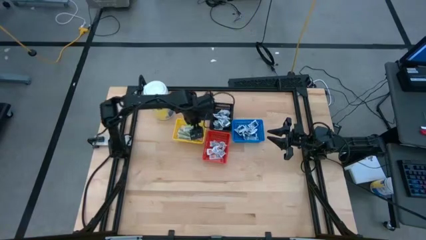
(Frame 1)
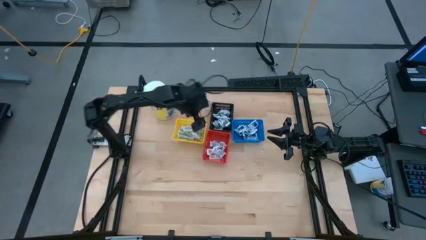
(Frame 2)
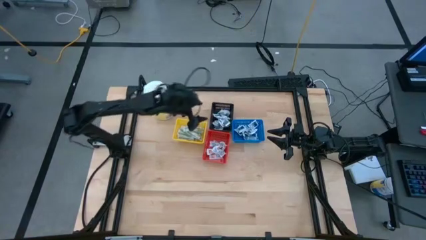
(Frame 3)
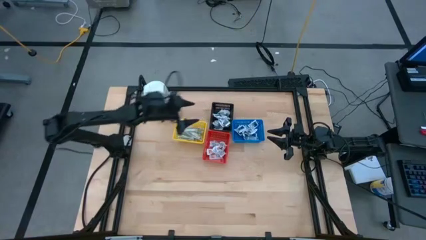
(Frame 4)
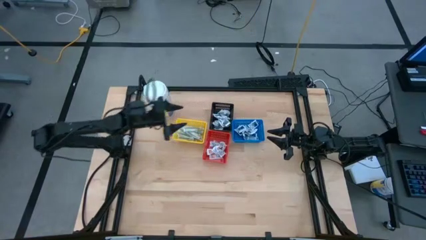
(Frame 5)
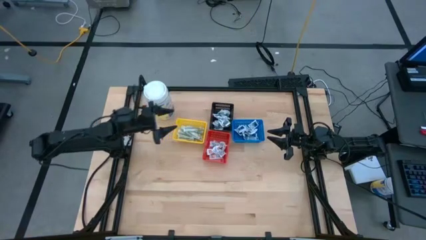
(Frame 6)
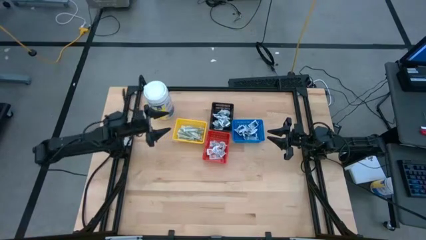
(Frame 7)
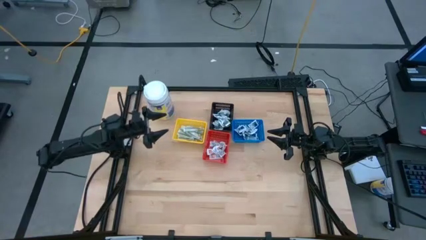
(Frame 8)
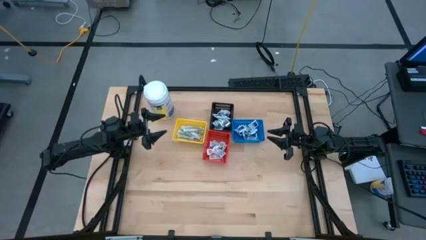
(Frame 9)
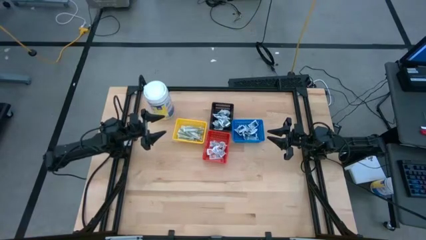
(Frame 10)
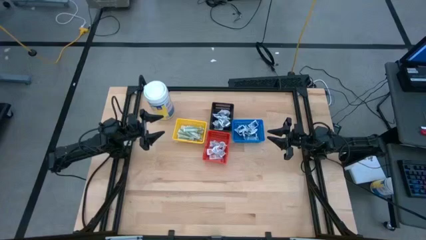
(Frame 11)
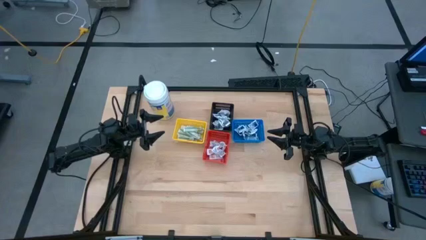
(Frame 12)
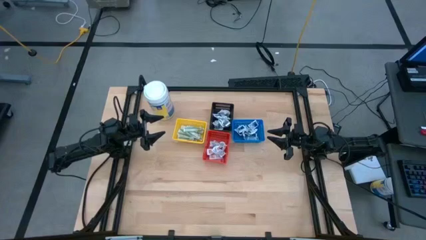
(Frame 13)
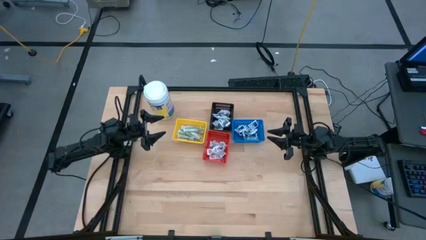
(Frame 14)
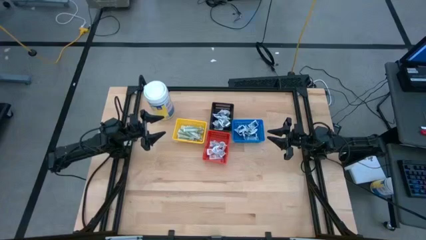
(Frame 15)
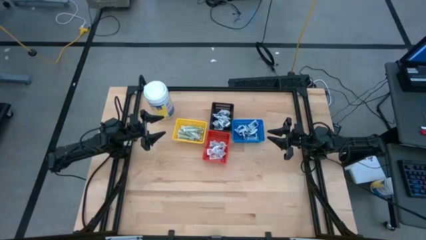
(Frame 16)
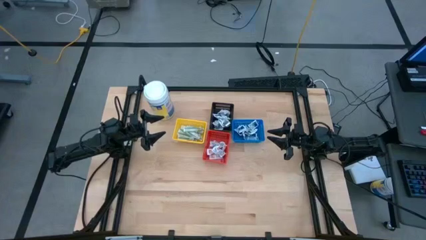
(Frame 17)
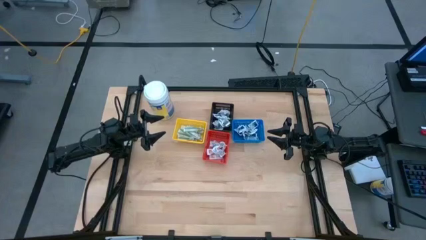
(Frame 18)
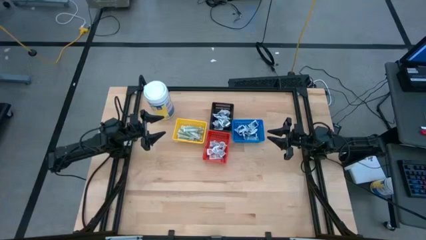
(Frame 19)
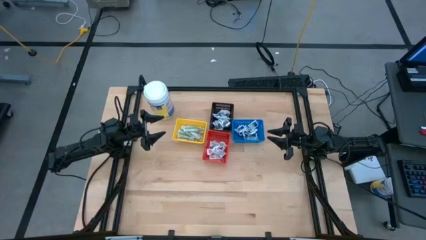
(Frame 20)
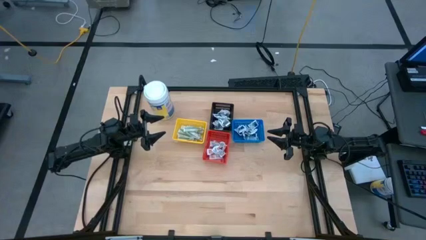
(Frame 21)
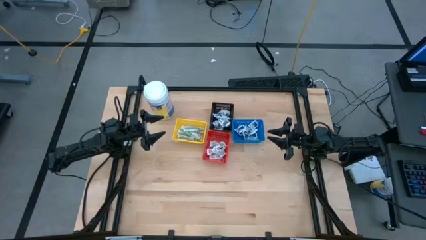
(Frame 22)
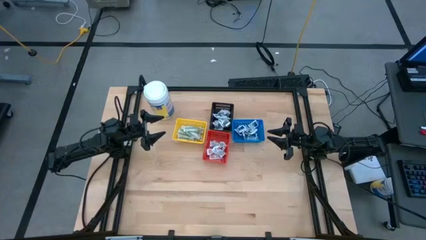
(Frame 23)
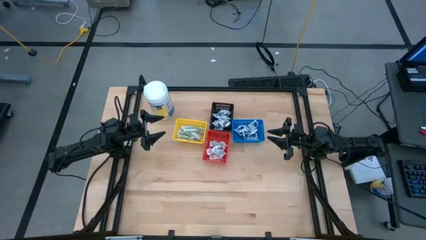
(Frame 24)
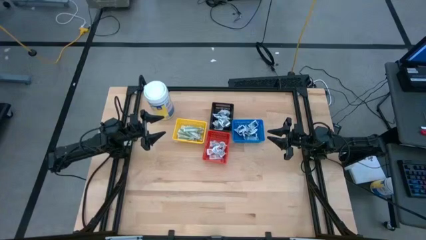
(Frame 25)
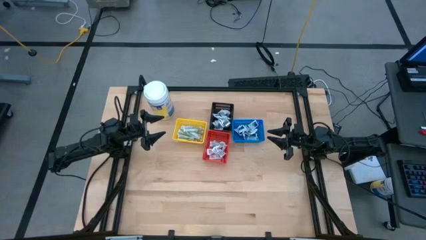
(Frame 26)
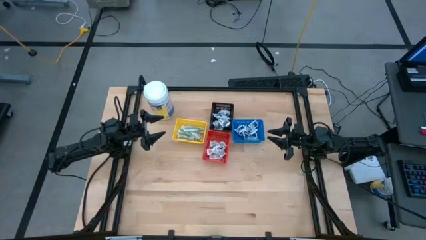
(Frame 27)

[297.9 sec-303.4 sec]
Task: Pick & Place First Aid Supplies
Return to Home Position

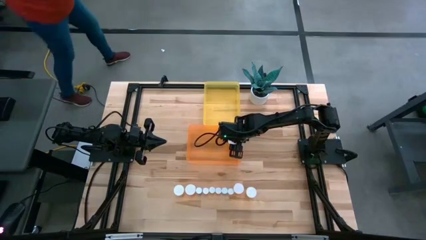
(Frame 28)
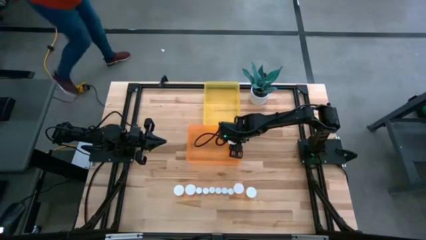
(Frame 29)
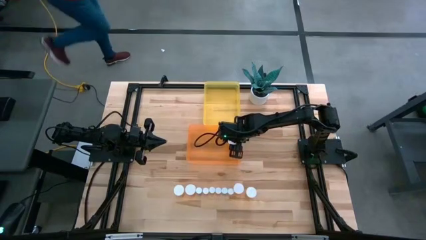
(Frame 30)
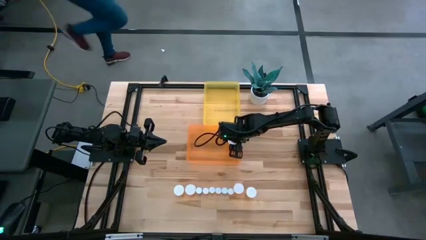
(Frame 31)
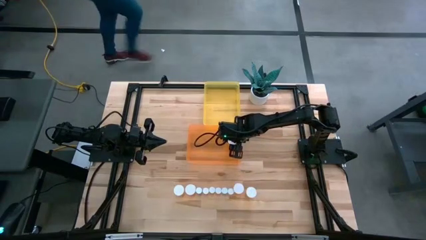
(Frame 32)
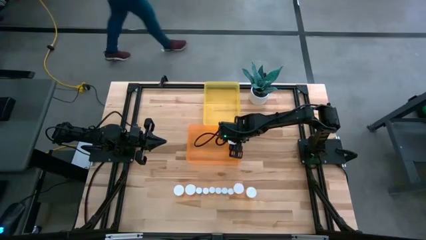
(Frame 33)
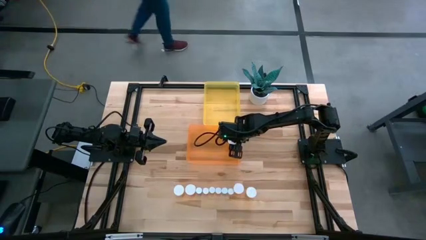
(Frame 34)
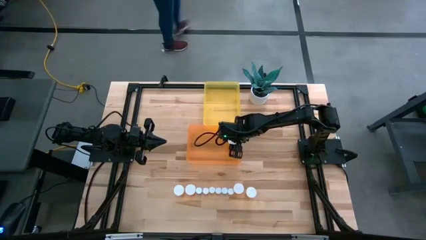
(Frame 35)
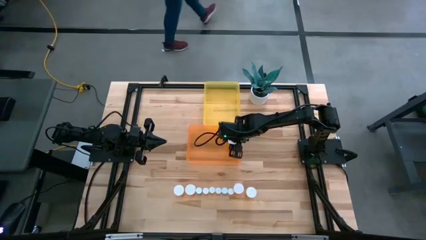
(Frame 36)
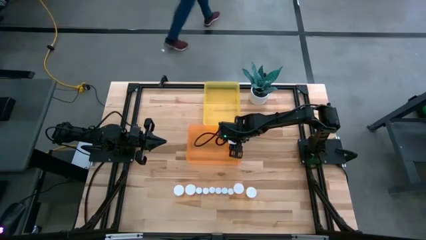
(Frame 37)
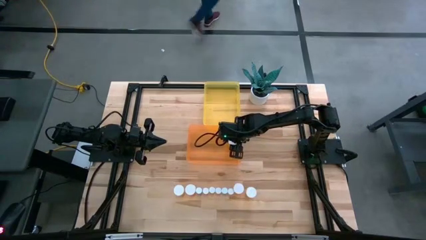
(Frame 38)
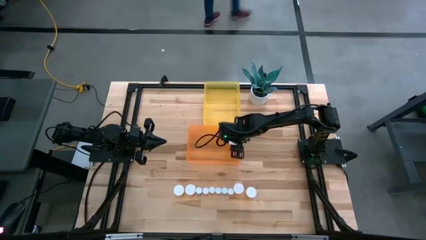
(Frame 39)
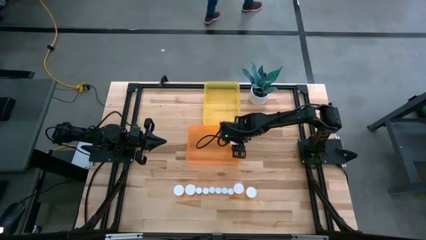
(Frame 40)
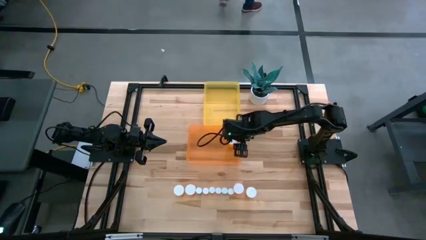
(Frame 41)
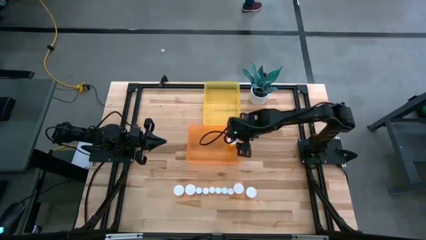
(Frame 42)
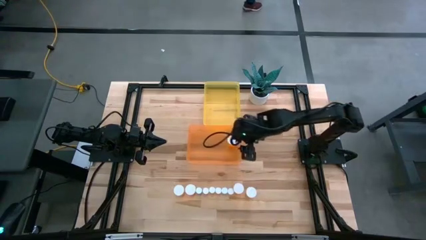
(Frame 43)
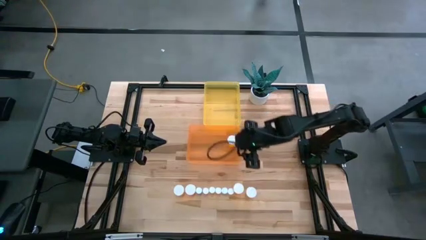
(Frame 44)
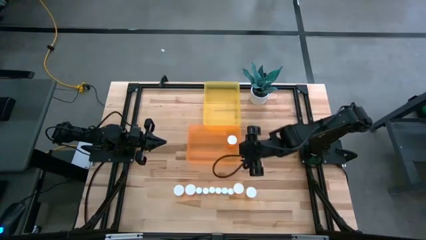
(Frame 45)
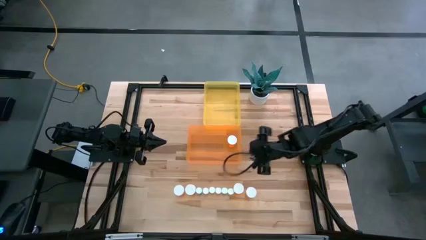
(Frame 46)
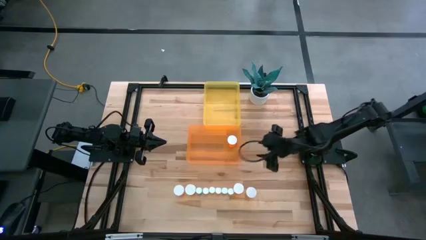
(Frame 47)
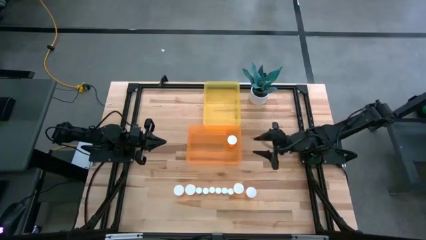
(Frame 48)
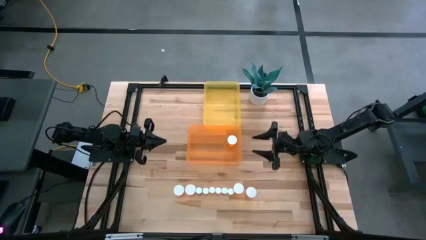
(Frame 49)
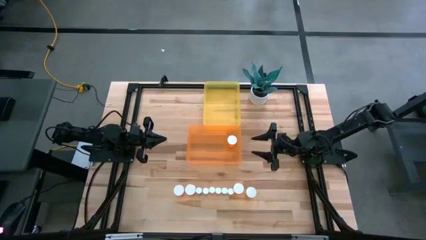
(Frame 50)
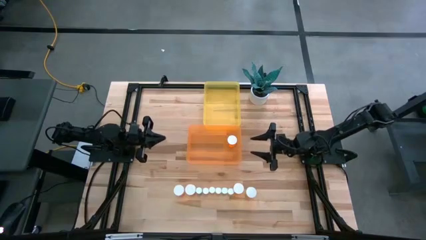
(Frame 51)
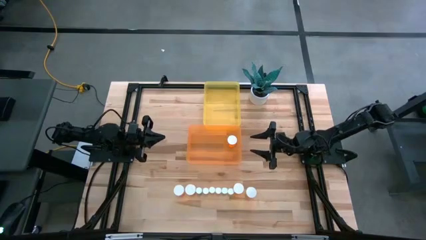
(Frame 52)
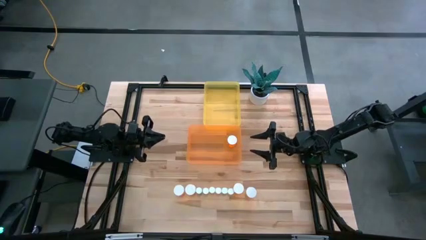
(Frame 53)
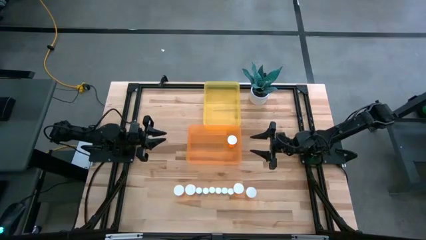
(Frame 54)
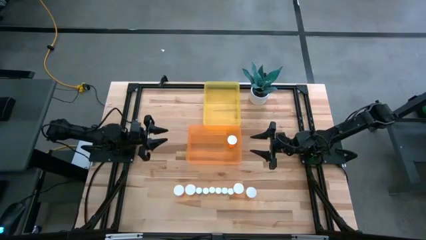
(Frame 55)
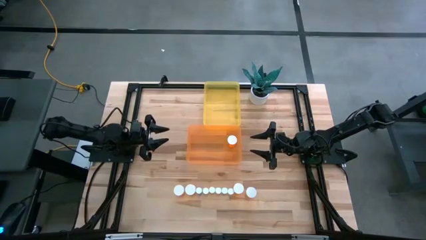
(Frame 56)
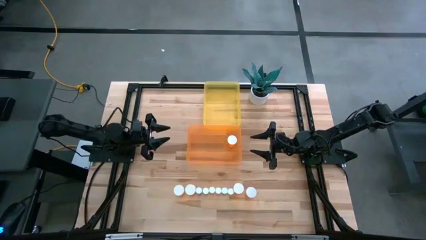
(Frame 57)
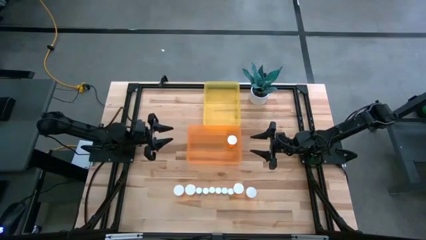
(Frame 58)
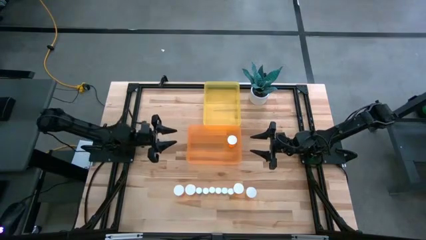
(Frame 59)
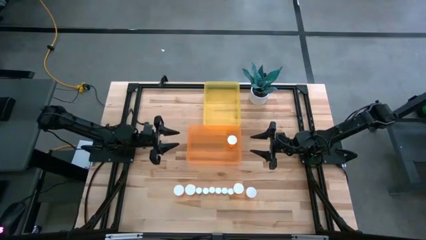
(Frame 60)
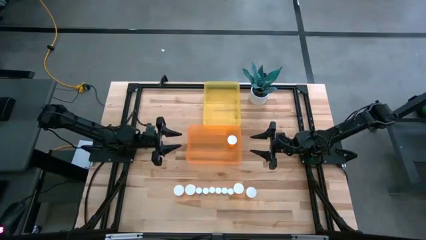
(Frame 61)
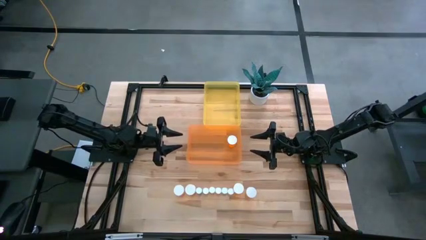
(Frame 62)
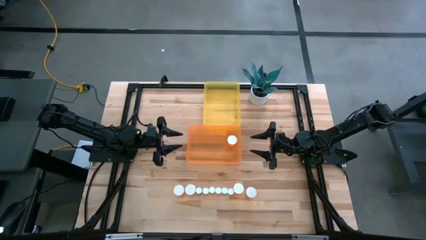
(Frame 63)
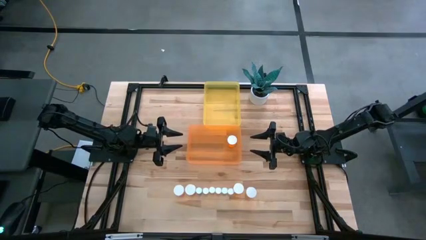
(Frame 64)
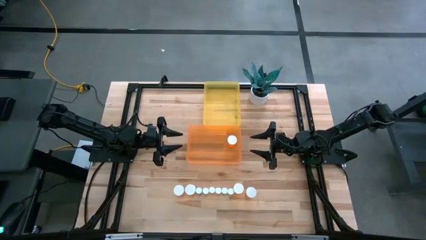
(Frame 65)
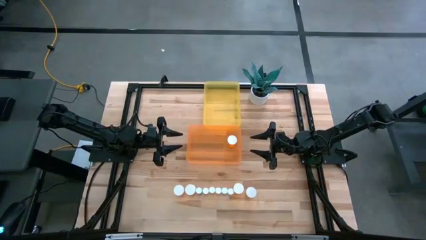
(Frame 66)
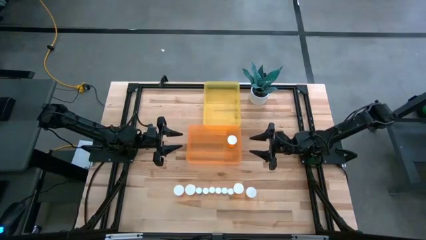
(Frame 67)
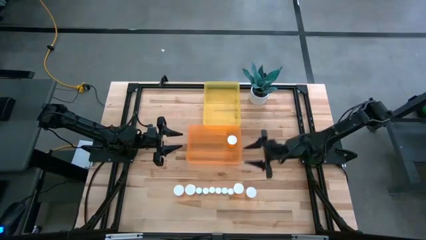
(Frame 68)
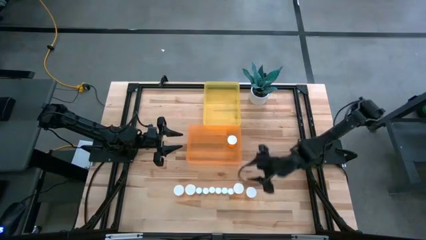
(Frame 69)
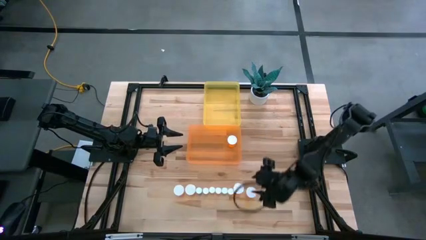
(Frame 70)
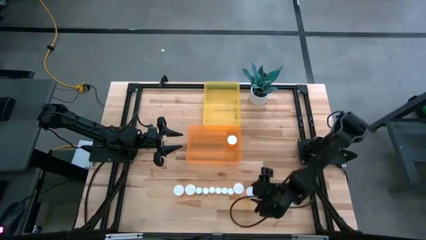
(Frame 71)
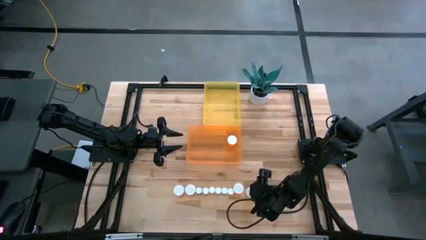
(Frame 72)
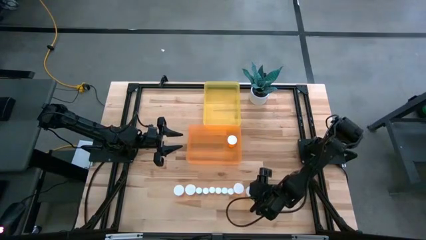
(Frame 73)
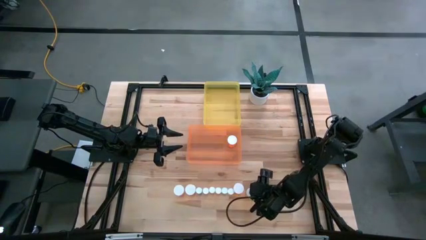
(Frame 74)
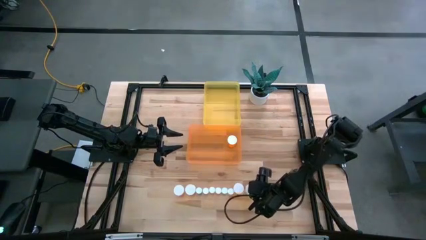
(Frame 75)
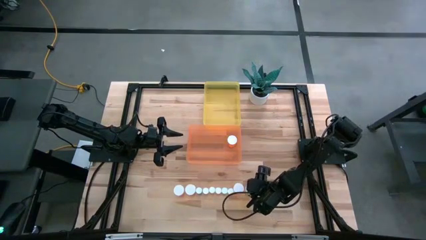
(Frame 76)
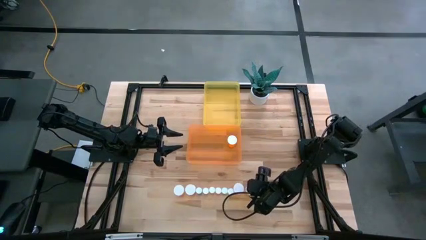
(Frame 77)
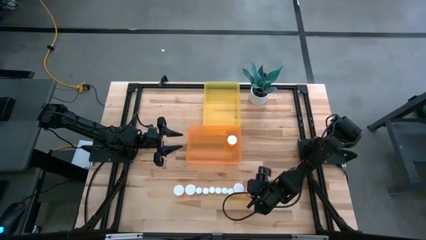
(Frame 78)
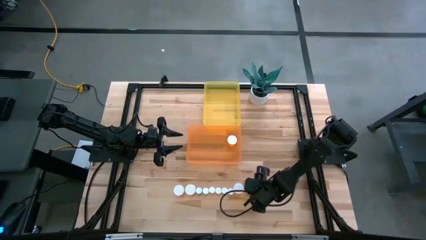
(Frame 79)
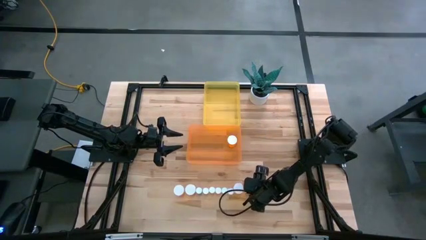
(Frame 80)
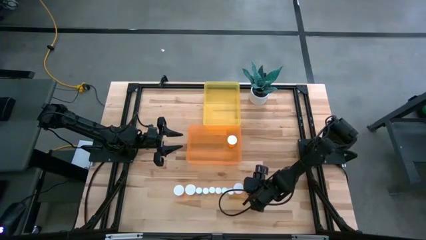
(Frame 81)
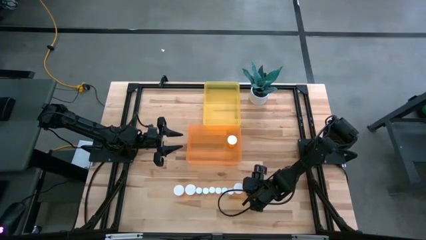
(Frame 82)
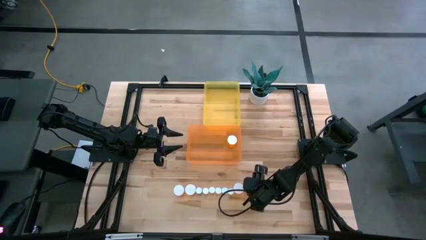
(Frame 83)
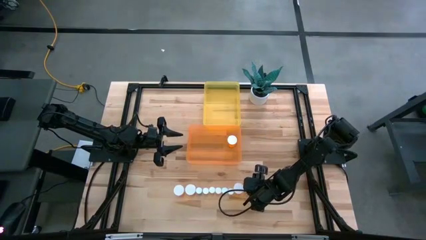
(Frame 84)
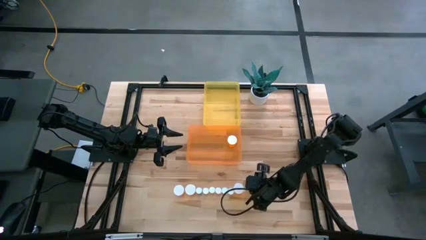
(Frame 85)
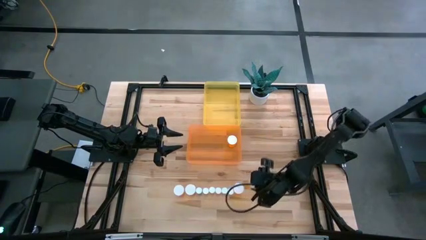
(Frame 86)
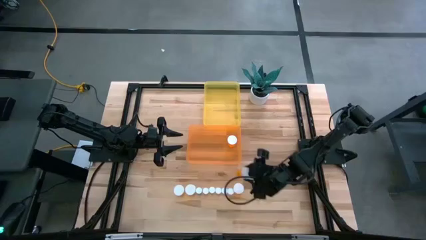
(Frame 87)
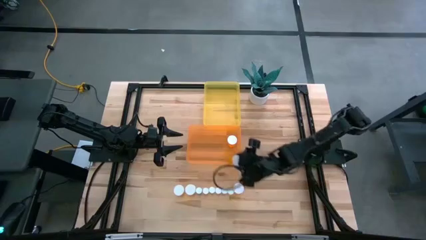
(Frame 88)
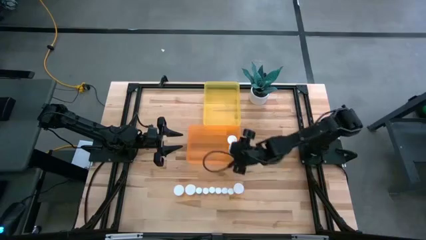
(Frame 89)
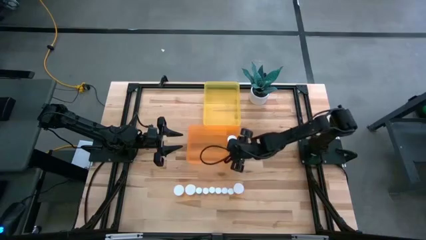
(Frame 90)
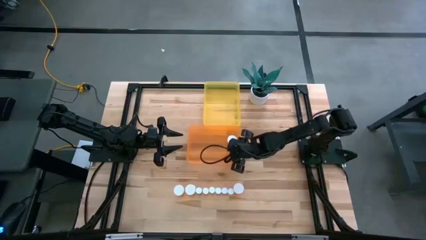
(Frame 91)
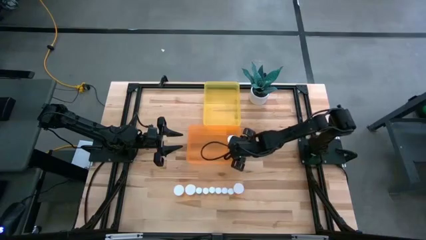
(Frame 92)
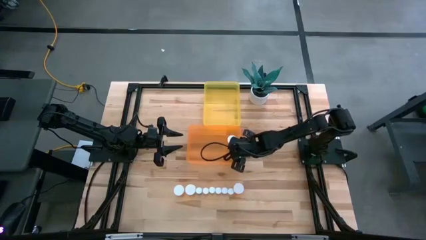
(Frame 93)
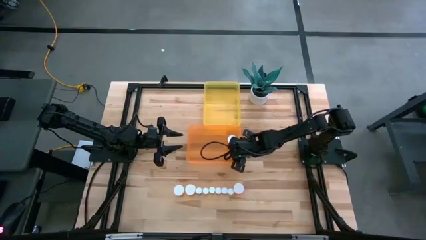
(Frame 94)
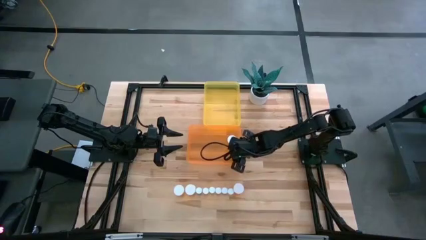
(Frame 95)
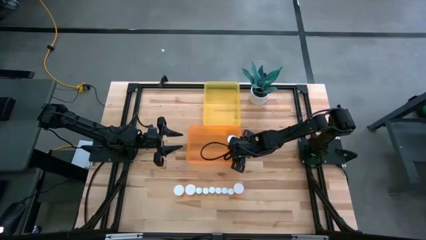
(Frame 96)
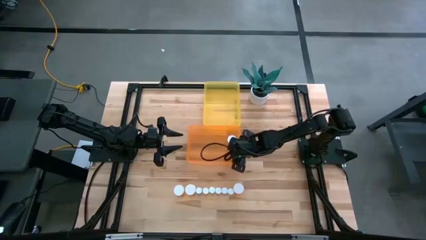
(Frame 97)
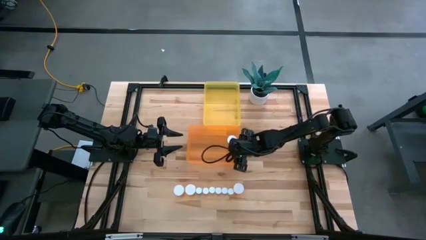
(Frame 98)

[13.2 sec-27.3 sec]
Task: Pick and place medicine bottles into bin by pill shape (circle, oval)
Put the big orange pill bottle into the orange bin
